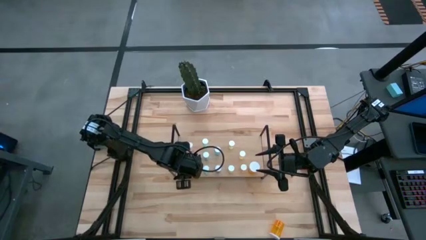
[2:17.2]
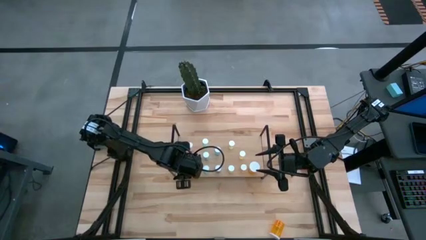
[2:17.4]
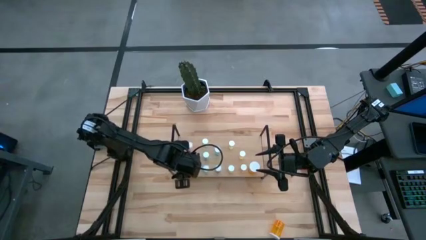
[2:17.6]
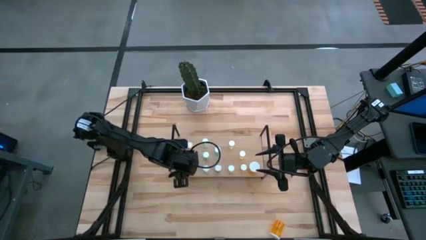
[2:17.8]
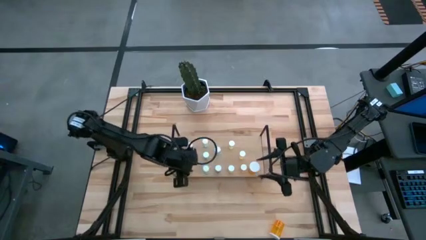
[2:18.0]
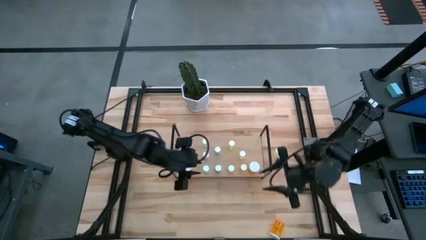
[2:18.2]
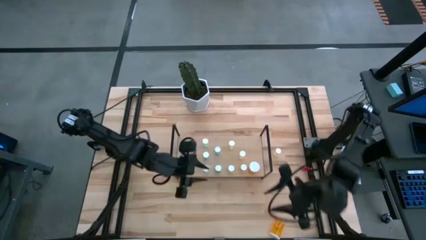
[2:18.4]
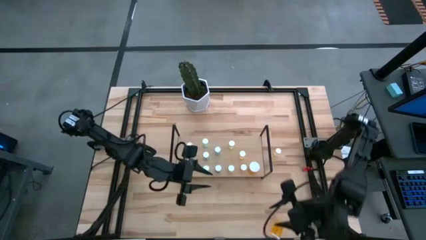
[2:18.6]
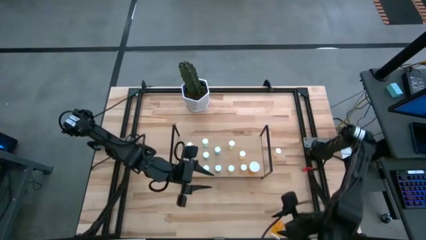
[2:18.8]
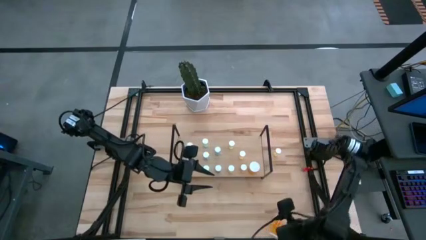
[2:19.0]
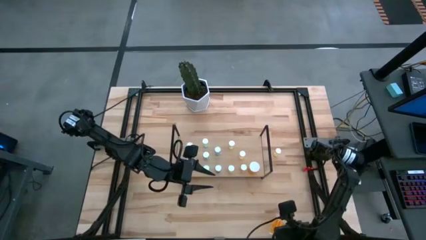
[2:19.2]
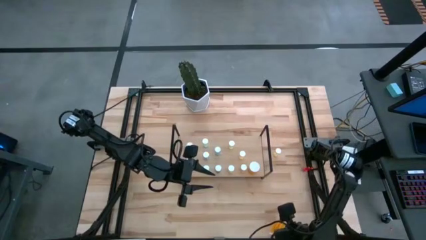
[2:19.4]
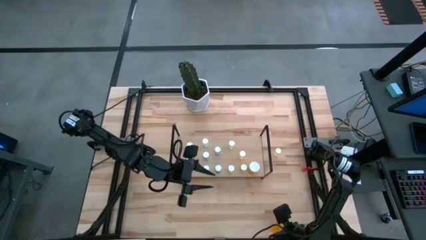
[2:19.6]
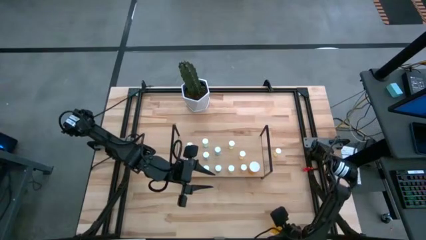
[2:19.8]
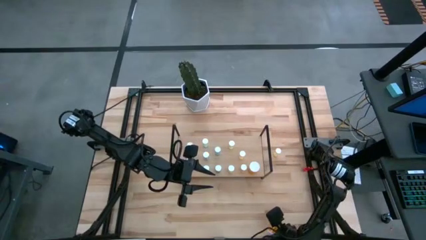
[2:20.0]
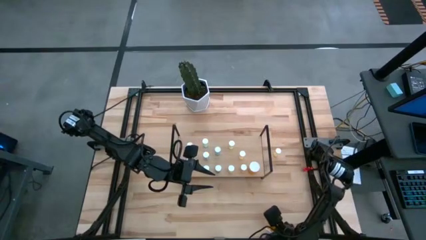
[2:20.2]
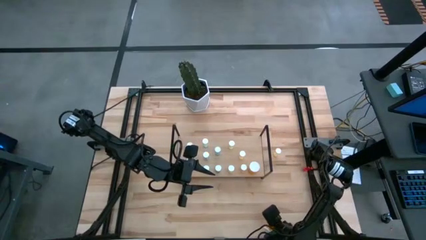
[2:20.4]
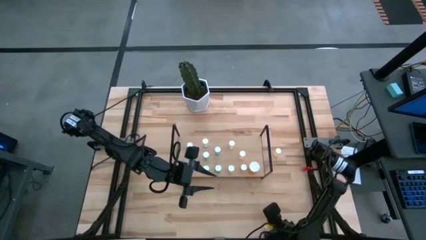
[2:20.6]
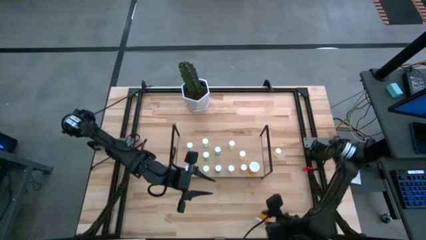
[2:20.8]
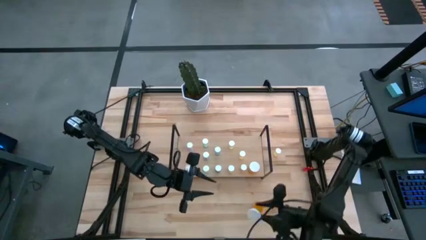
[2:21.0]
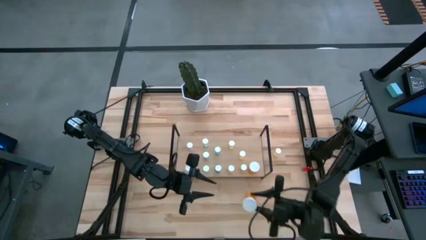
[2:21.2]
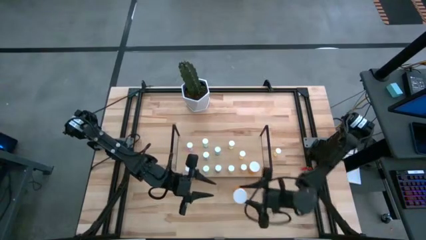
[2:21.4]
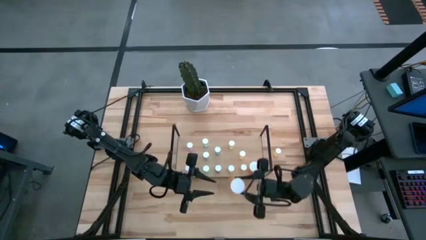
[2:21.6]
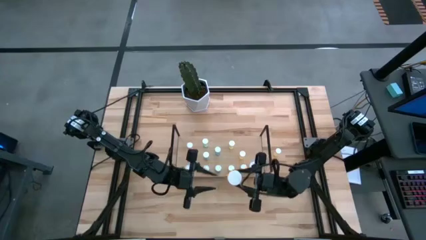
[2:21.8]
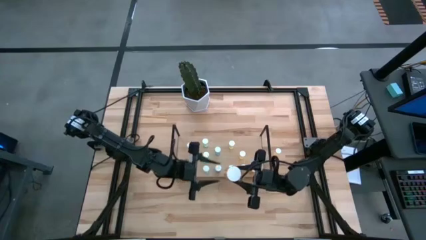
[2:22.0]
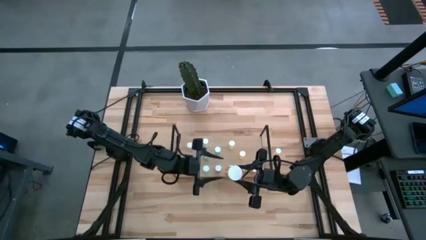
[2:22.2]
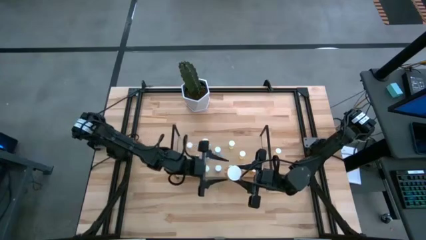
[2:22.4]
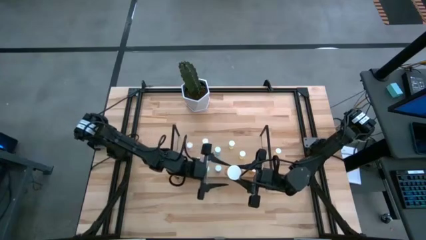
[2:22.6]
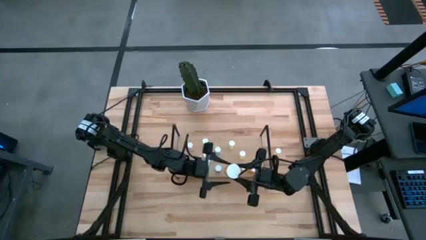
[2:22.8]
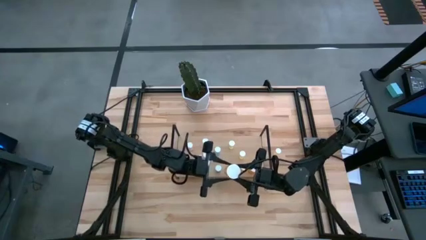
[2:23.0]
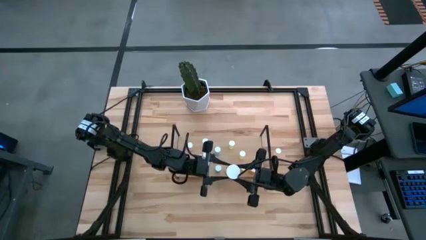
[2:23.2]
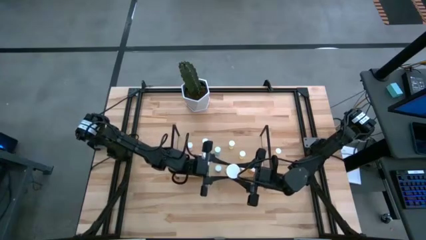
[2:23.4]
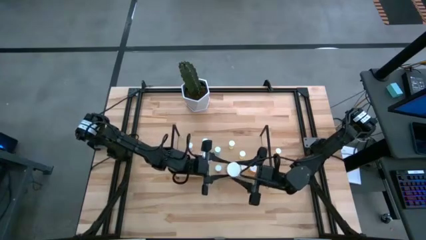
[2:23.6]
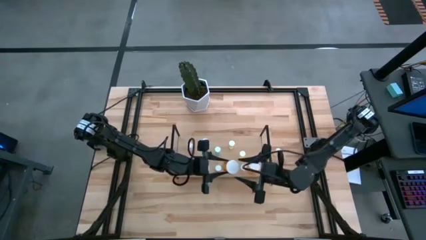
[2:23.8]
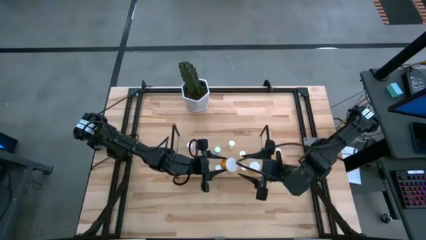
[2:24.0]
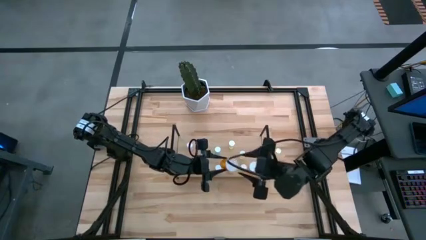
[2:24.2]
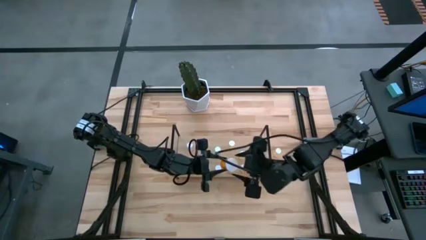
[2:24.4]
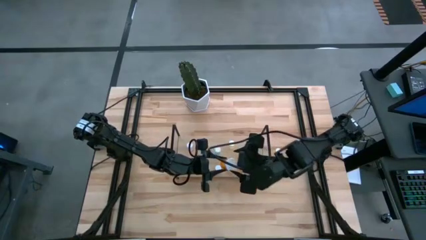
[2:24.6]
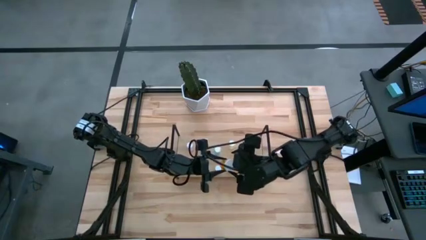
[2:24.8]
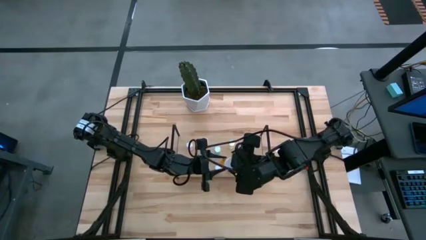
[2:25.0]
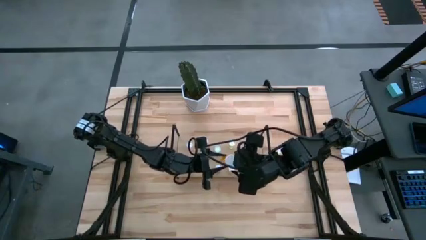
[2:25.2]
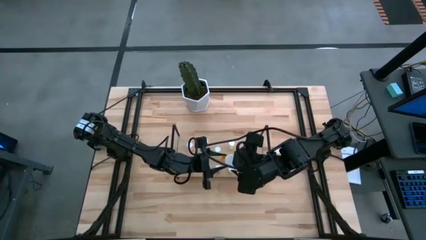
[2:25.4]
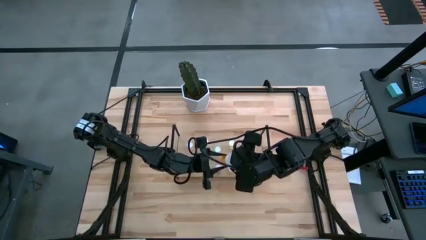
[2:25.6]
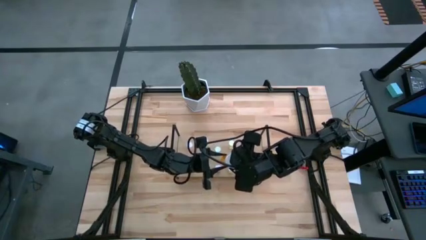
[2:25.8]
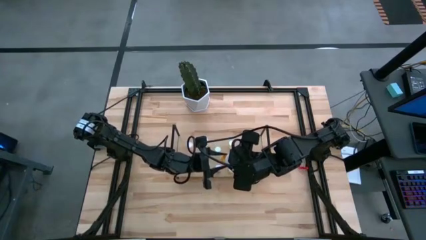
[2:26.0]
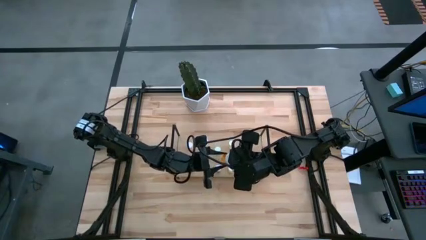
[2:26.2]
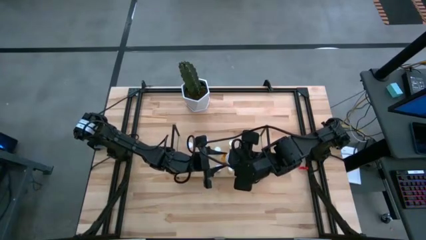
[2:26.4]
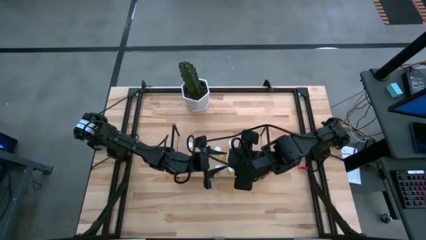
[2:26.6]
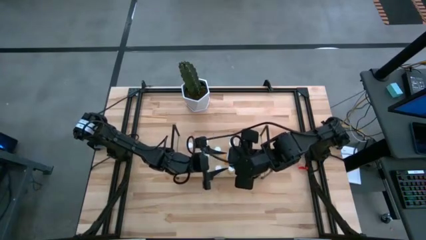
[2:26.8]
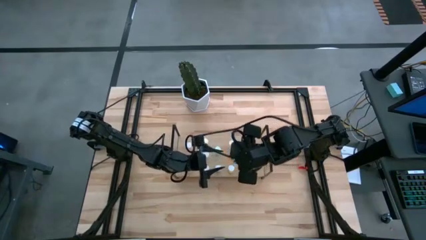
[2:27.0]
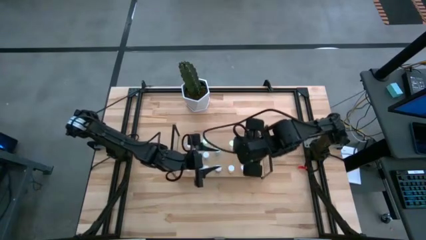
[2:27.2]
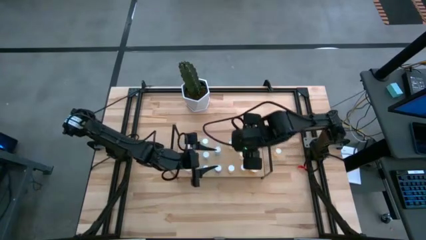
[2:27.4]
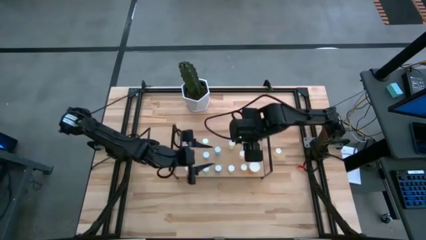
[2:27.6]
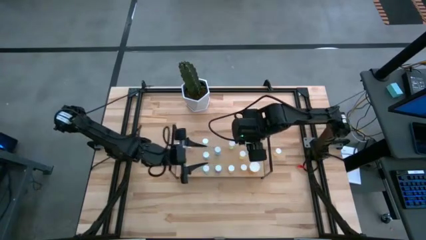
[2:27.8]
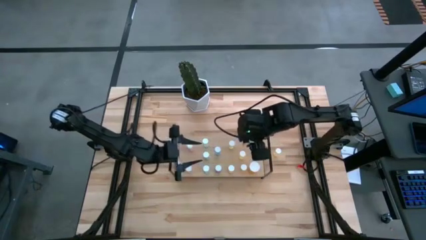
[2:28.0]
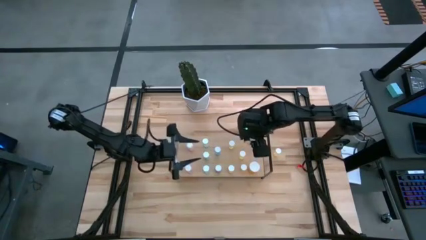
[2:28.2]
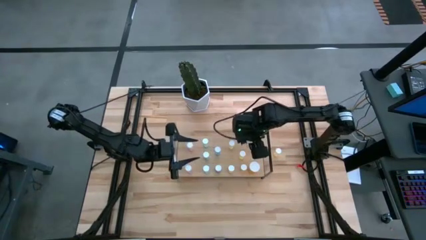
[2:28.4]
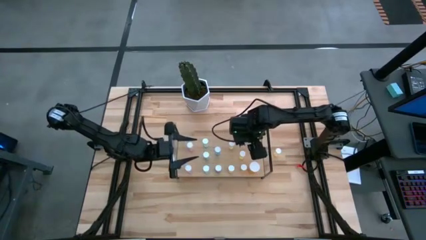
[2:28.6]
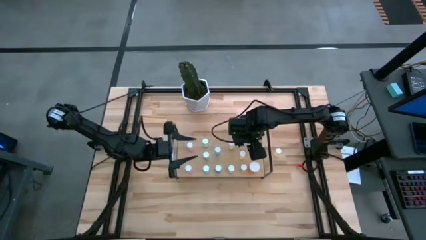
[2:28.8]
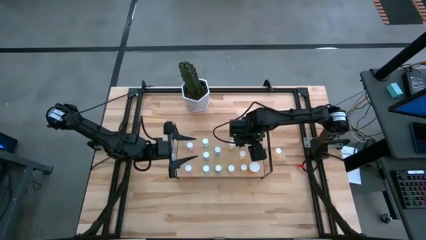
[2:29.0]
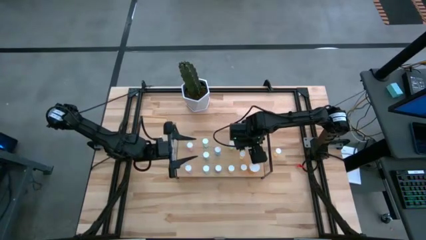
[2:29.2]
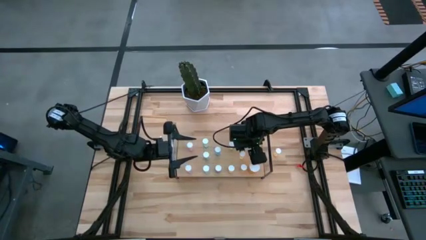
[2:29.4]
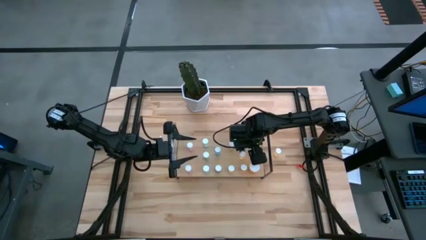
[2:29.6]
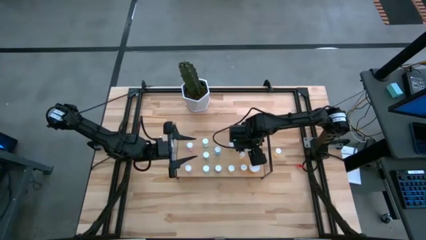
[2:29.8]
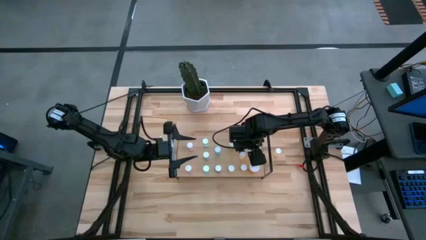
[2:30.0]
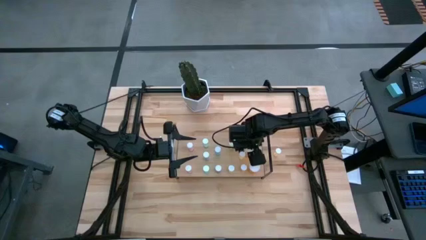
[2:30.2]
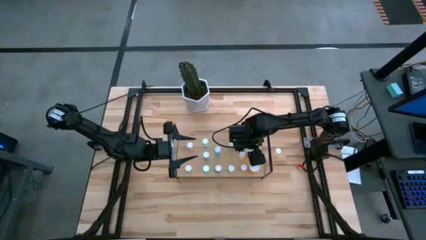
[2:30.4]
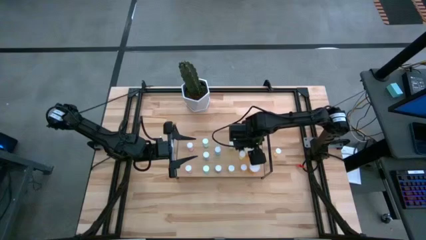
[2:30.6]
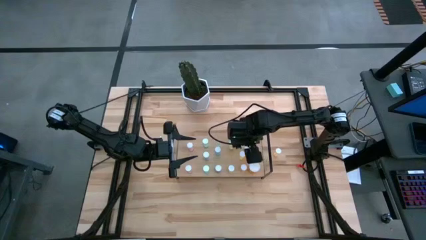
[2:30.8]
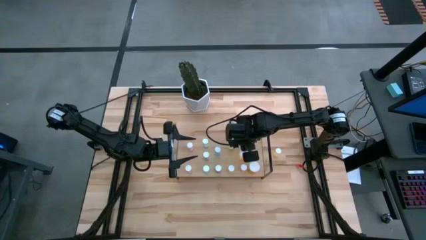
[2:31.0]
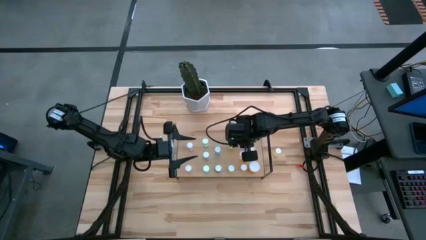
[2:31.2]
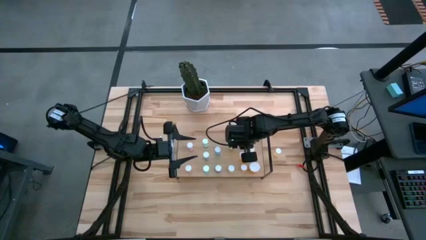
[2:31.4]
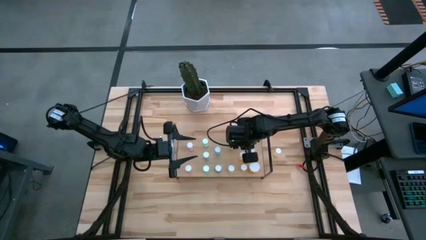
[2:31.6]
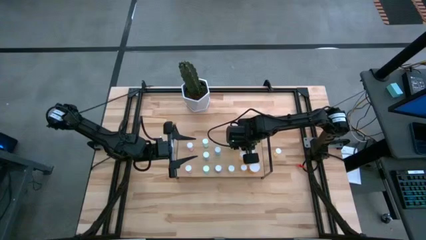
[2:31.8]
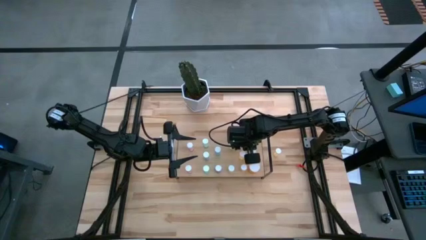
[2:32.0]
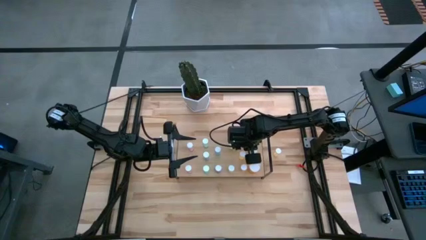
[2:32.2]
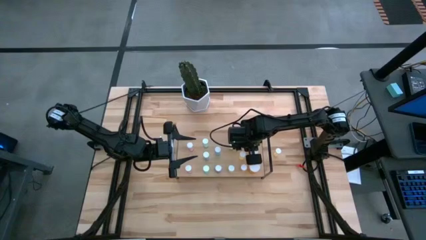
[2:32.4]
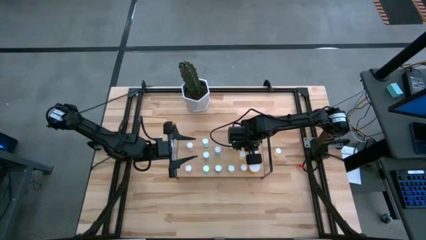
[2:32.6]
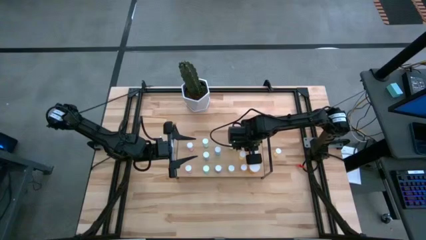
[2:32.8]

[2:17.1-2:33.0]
Task: Pick and place medicine bottles onto shelf by color
Put the orange pill bottle on the shelf aligned with the other orange pill bottle
